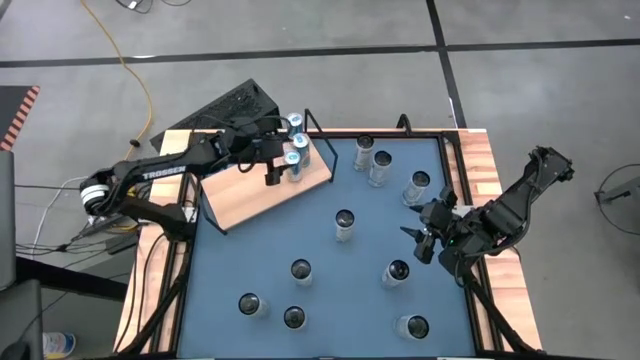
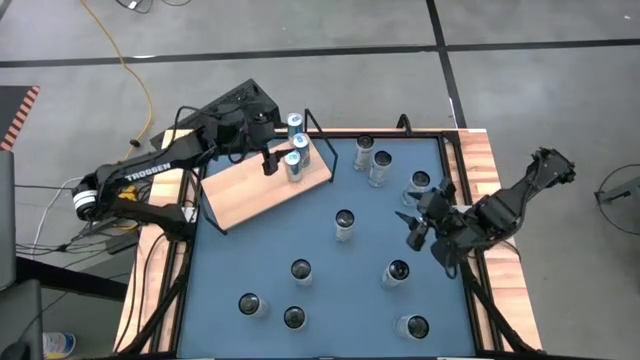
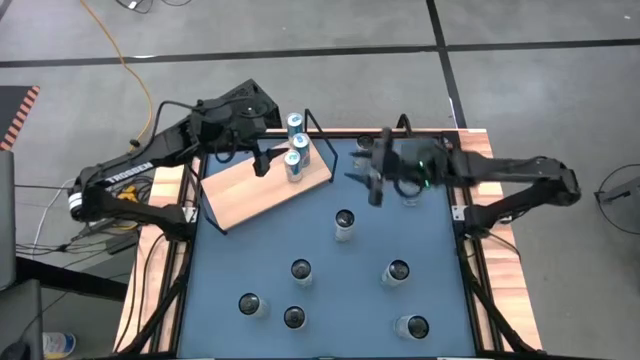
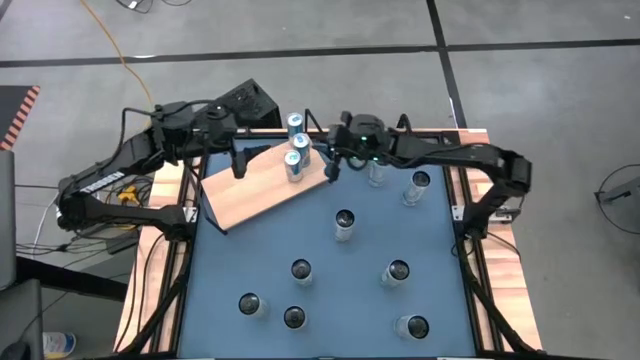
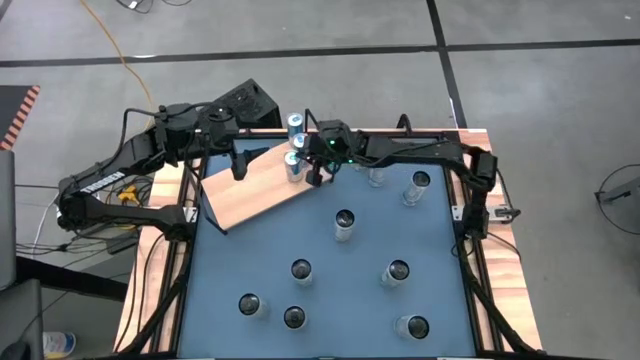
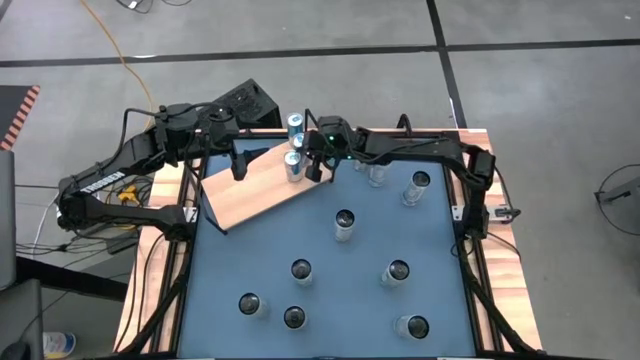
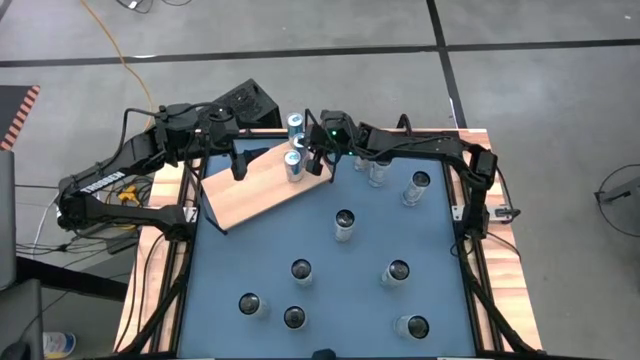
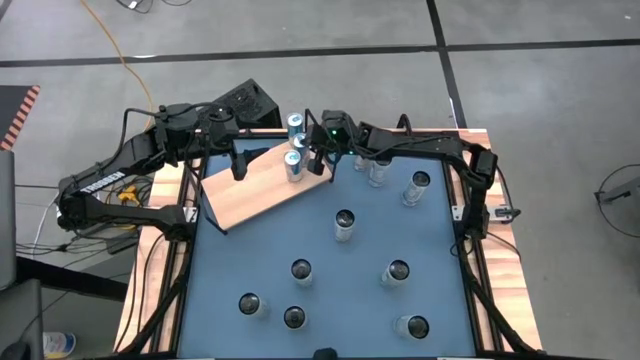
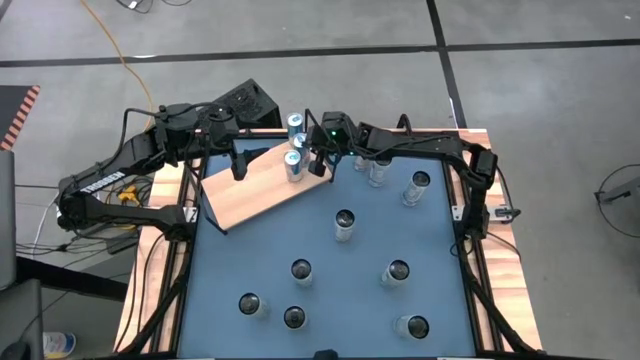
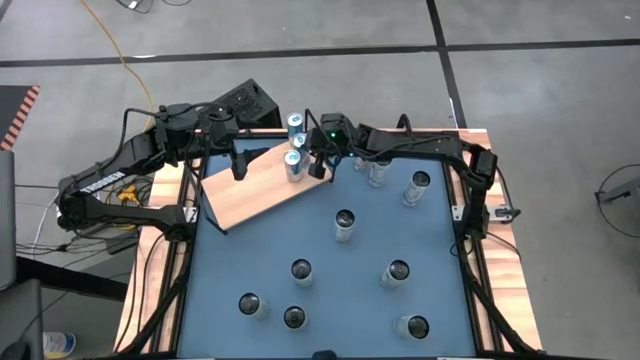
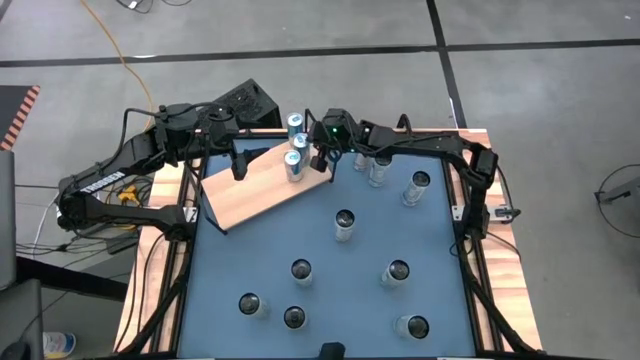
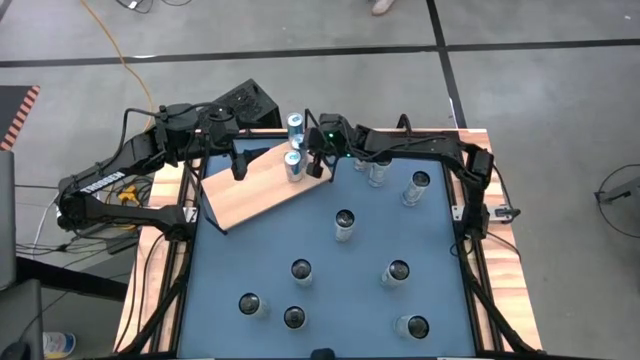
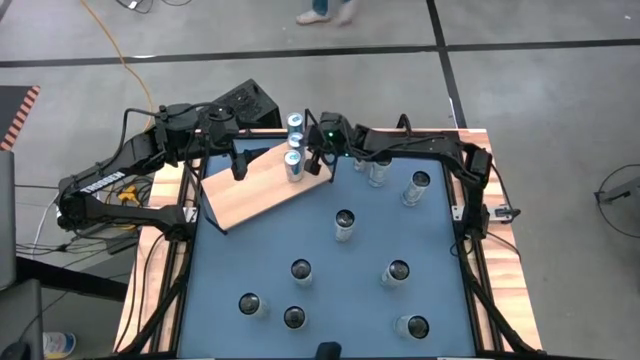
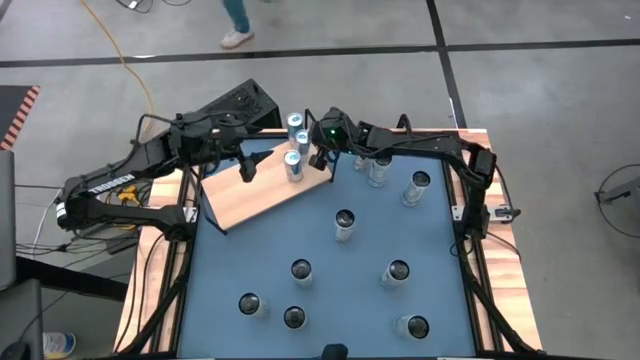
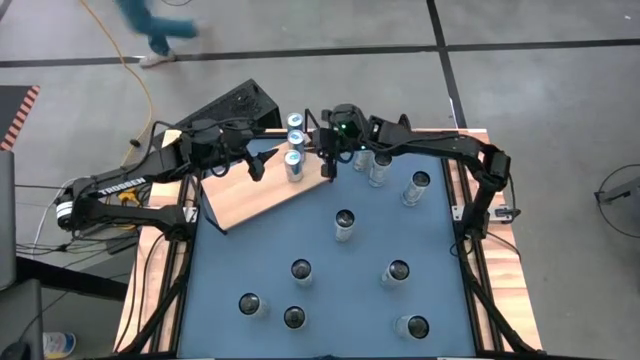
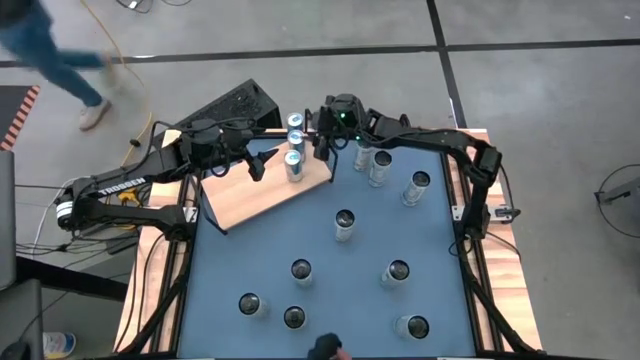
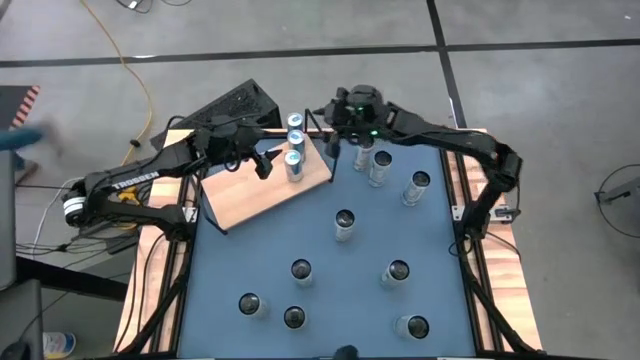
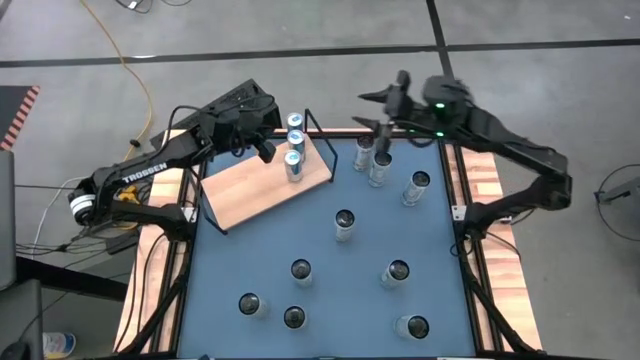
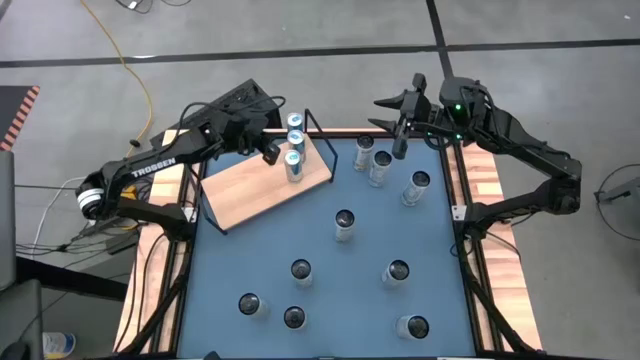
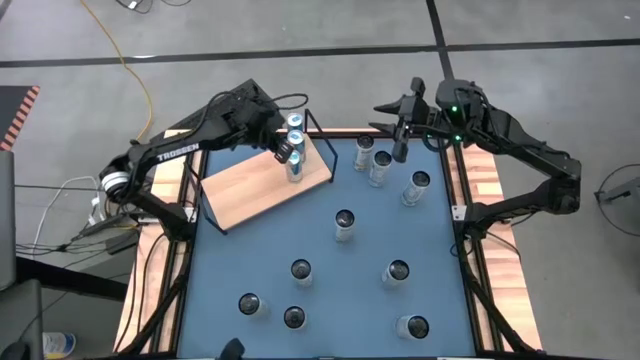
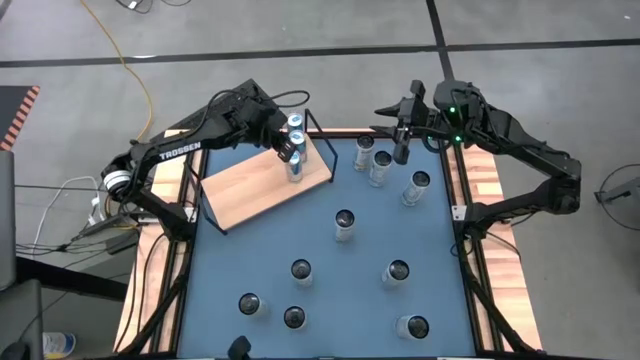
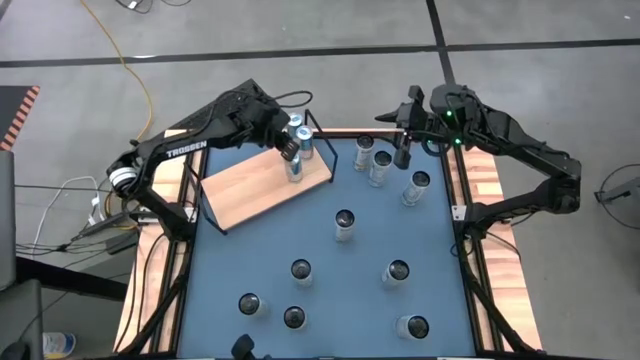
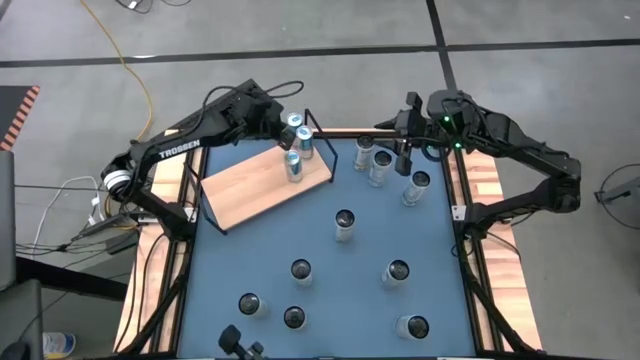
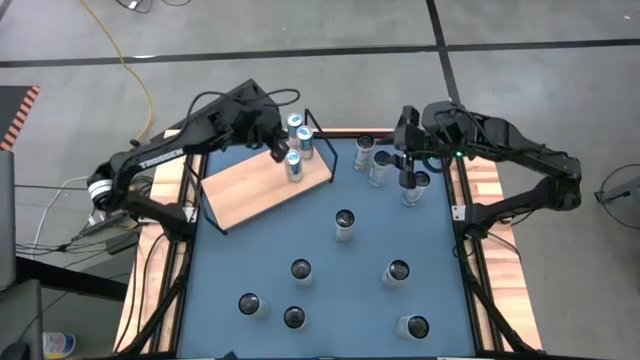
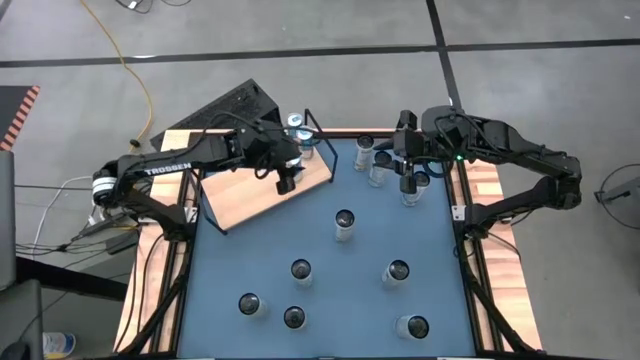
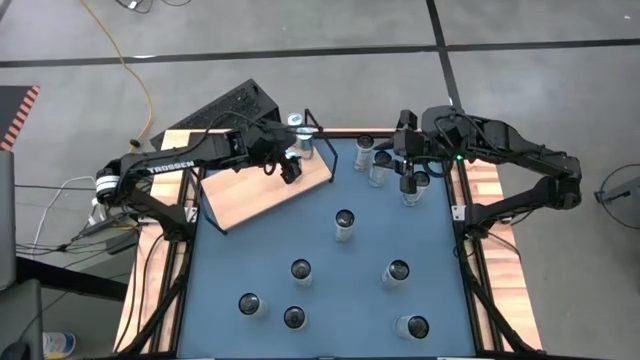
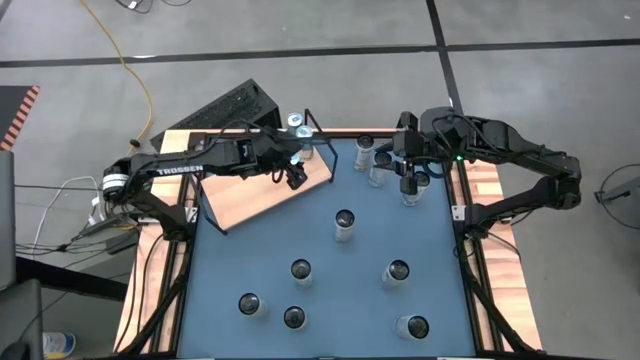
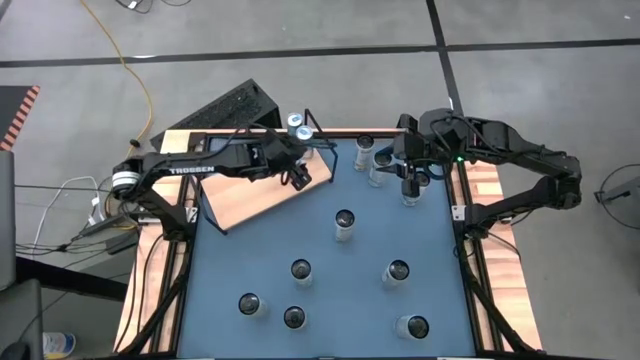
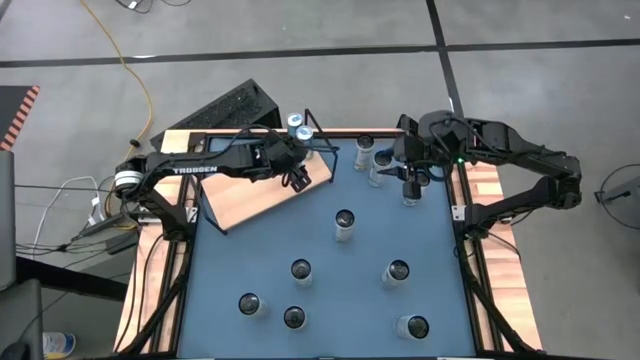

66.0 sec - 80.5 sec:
Task: Place canned beverage on shelf
Adjust the blue soda cans on the shelf

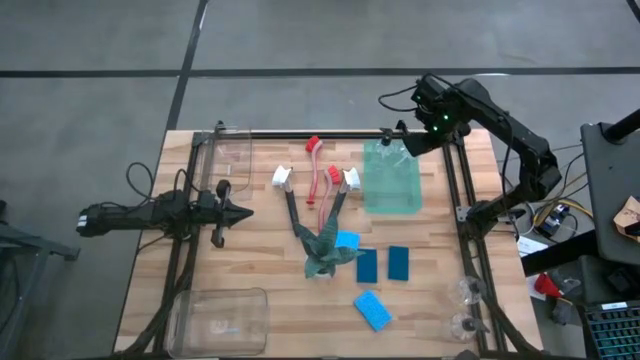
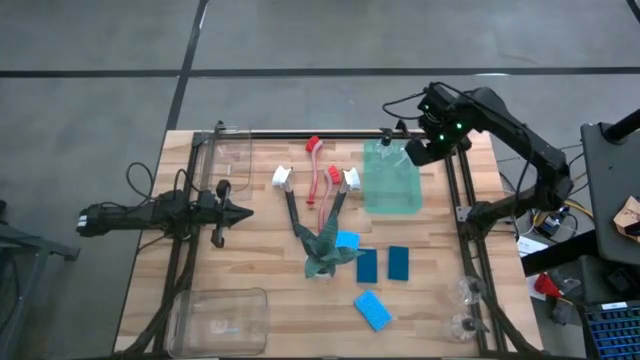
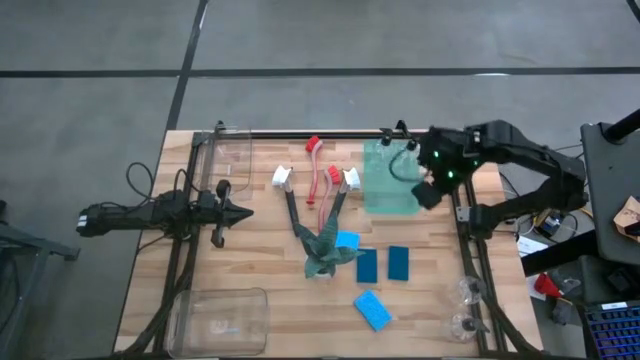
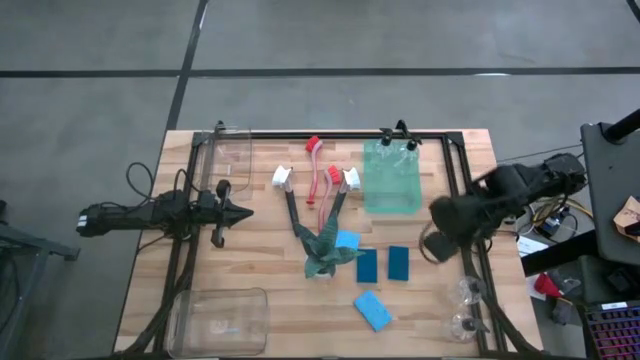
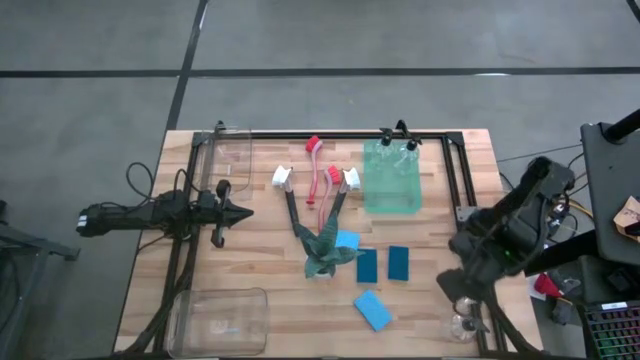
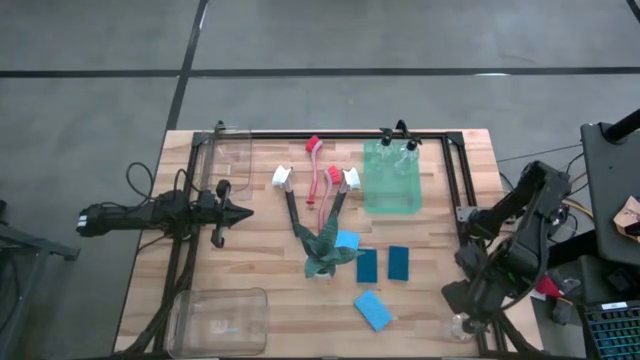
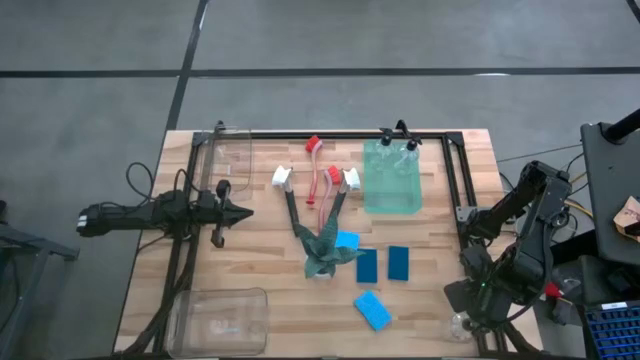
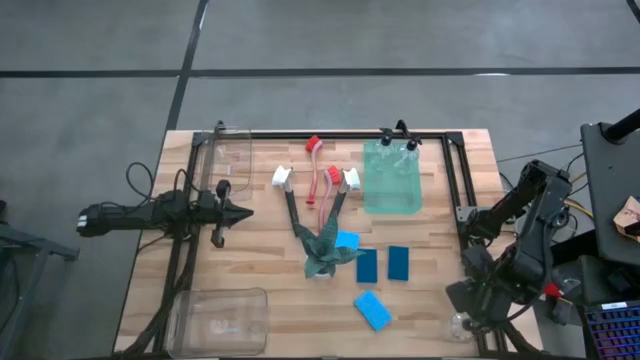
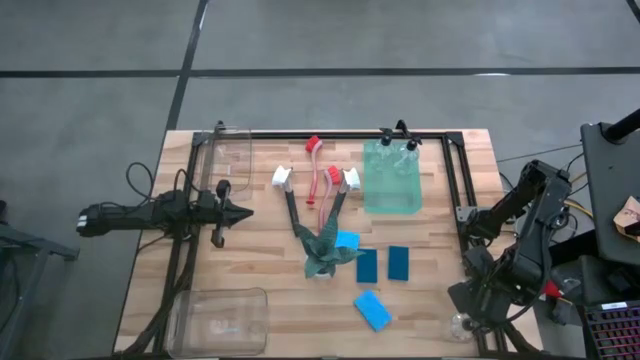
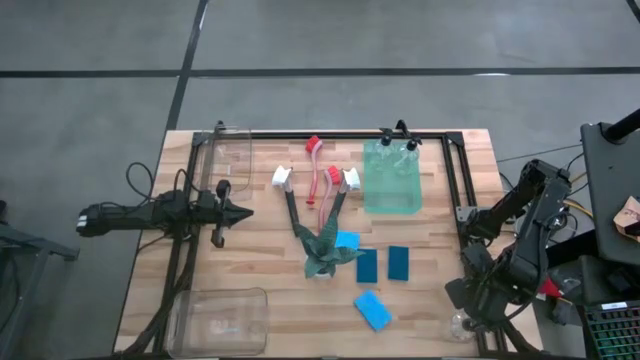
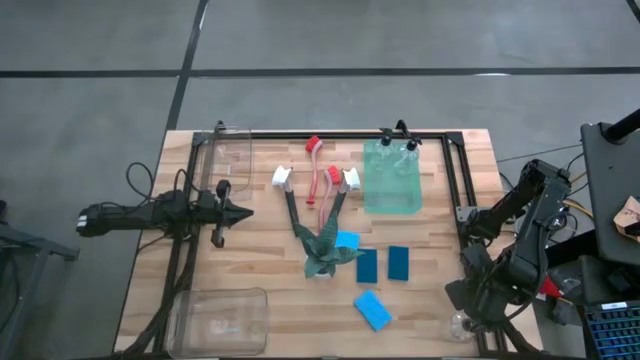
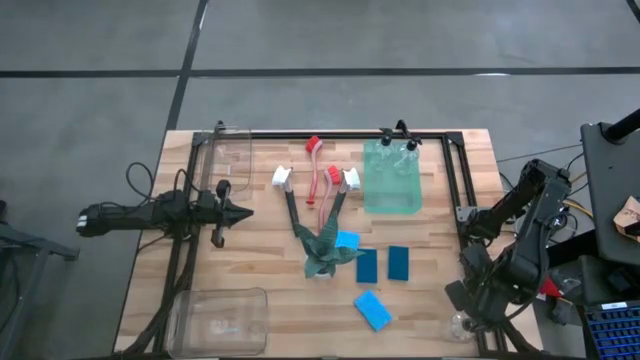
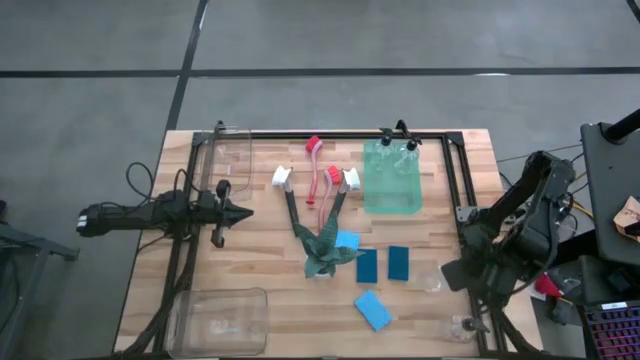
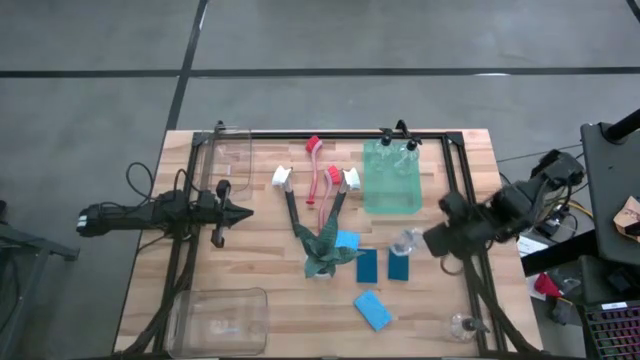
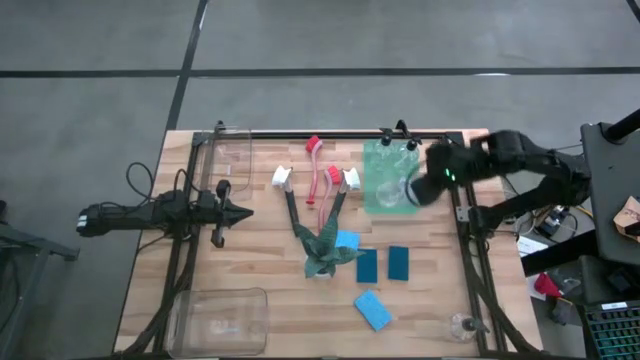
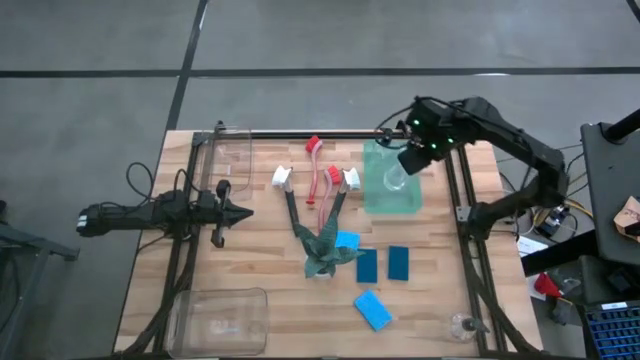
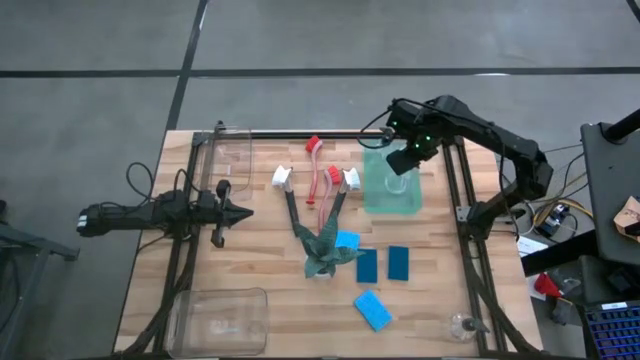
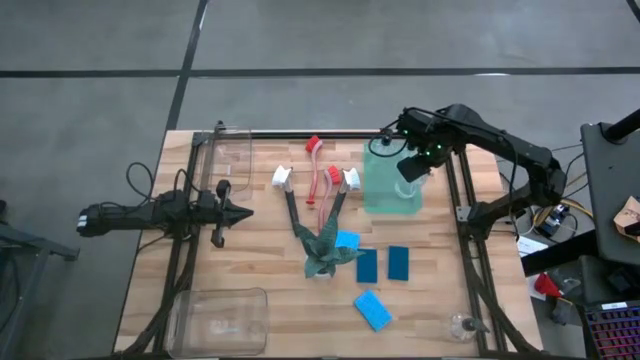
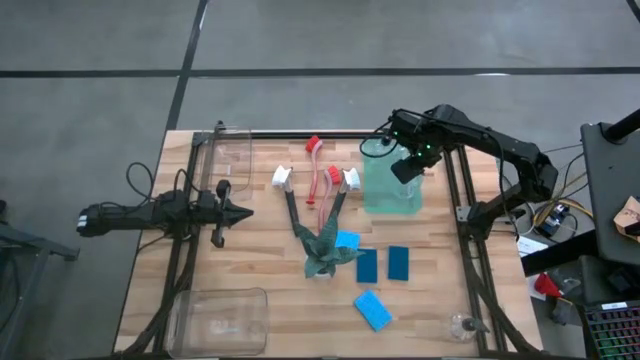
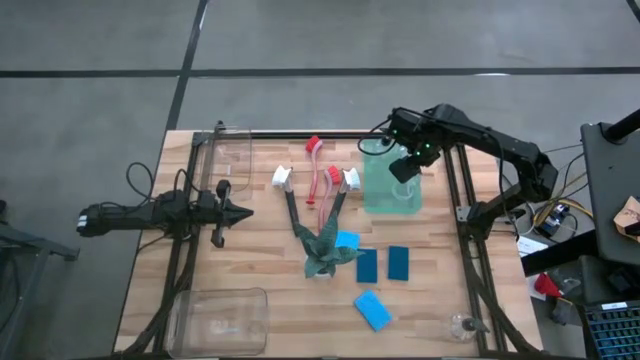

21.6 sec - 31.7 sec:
Task: Pick & Place Kitchen Sink Supplies
Put the soap dispenser into the green bin
